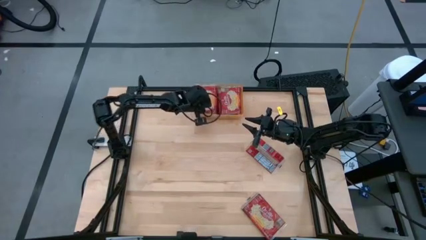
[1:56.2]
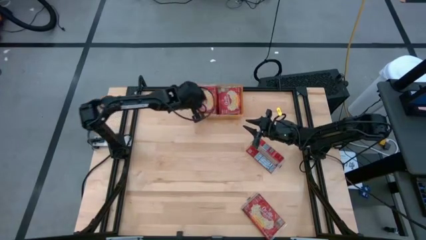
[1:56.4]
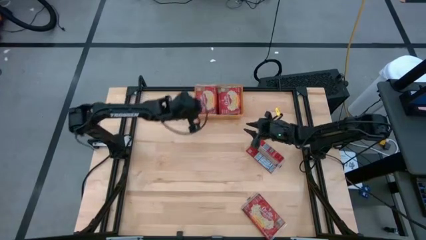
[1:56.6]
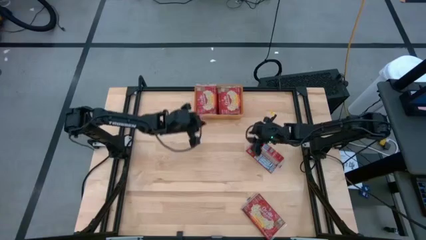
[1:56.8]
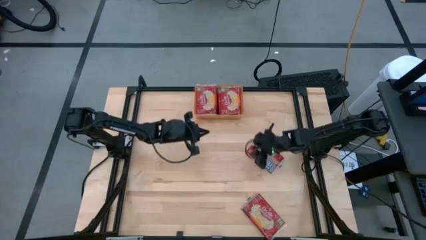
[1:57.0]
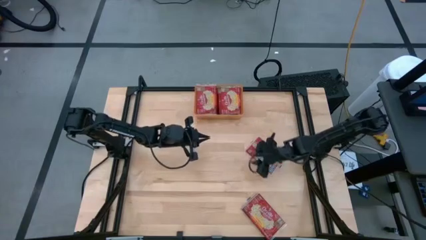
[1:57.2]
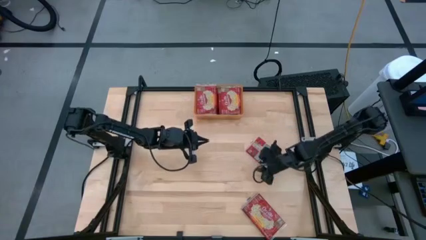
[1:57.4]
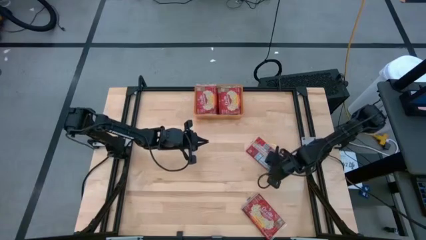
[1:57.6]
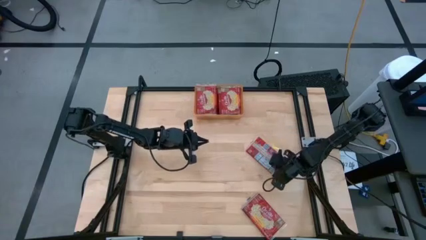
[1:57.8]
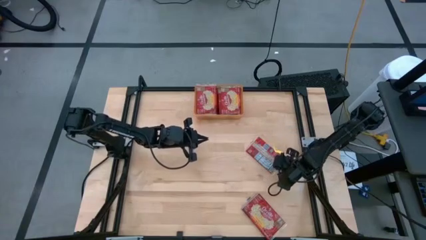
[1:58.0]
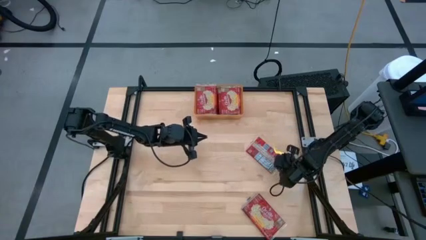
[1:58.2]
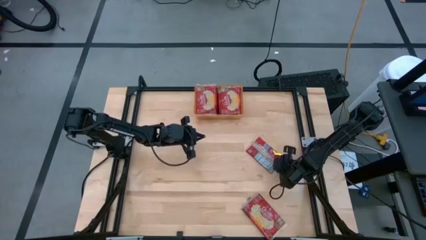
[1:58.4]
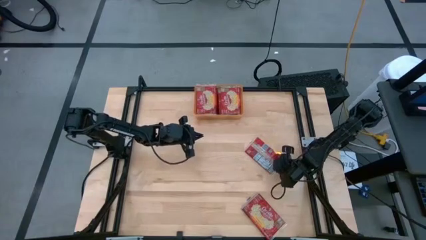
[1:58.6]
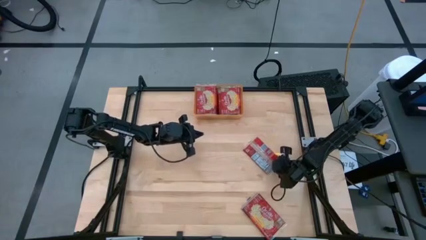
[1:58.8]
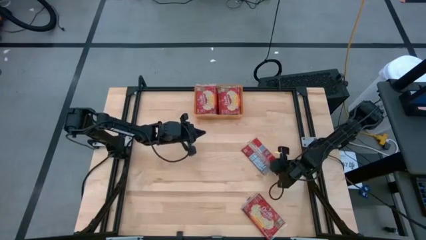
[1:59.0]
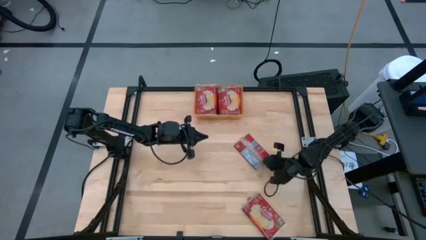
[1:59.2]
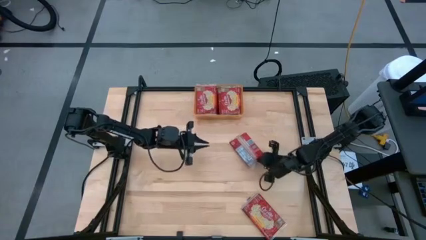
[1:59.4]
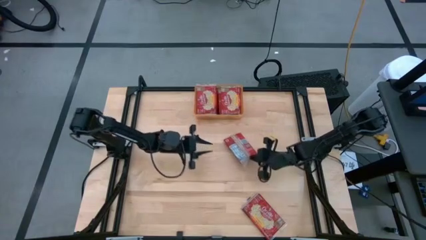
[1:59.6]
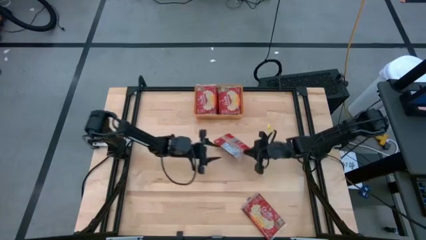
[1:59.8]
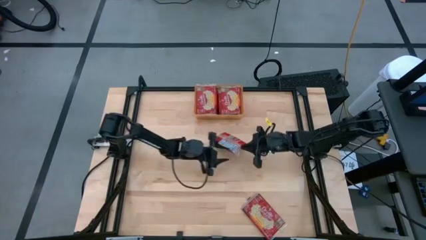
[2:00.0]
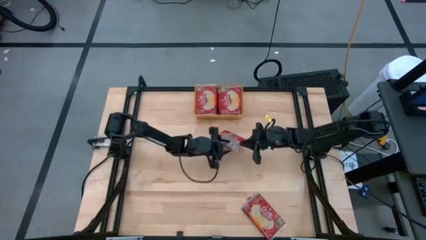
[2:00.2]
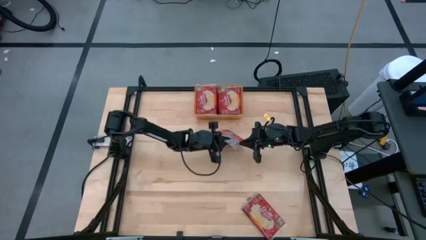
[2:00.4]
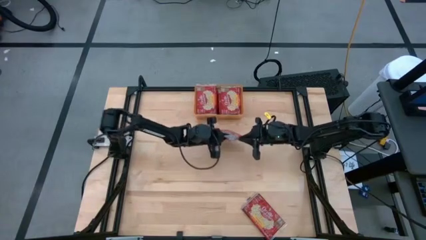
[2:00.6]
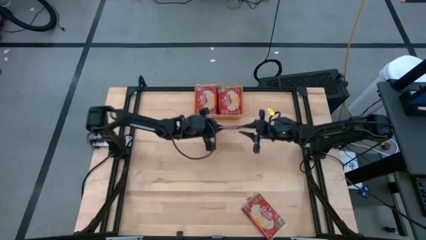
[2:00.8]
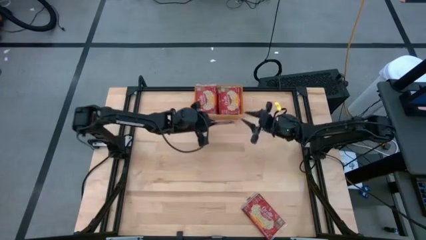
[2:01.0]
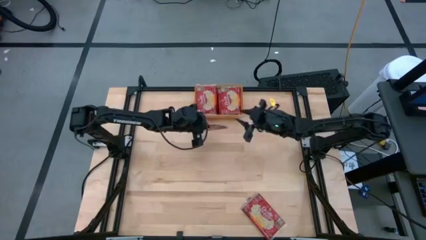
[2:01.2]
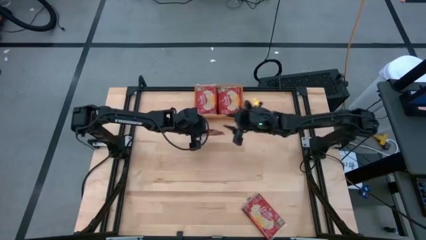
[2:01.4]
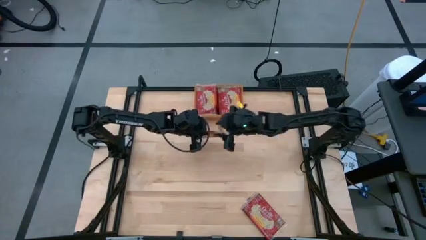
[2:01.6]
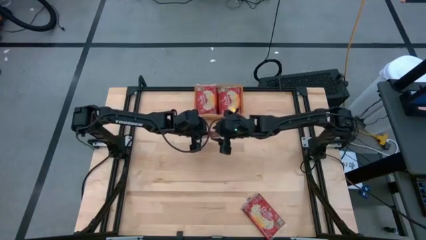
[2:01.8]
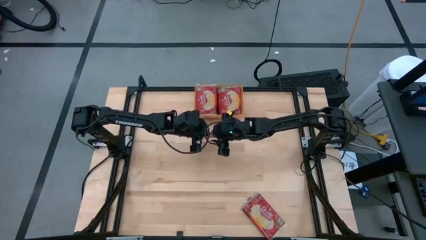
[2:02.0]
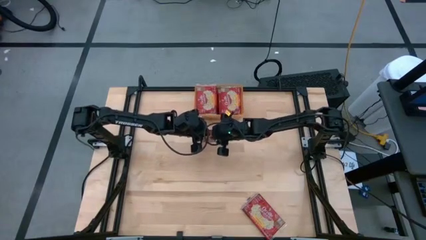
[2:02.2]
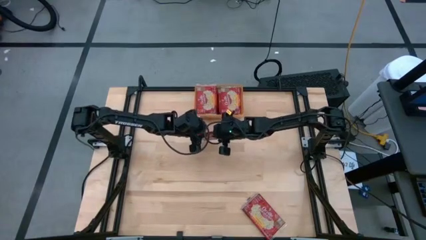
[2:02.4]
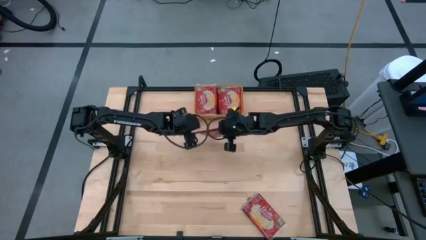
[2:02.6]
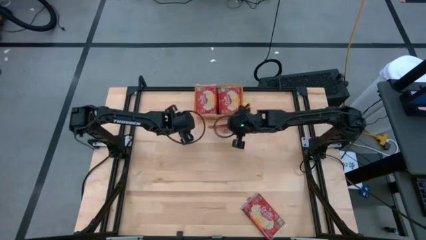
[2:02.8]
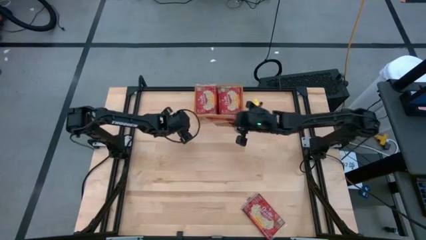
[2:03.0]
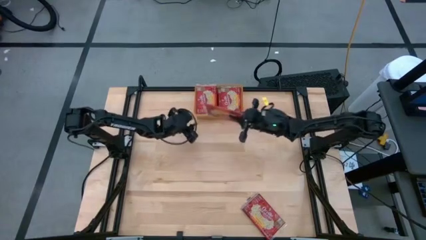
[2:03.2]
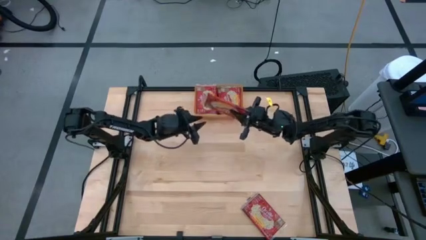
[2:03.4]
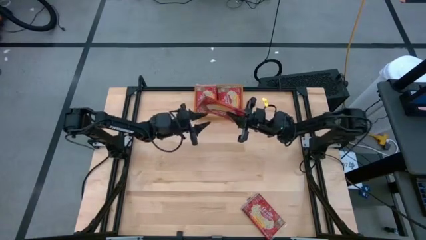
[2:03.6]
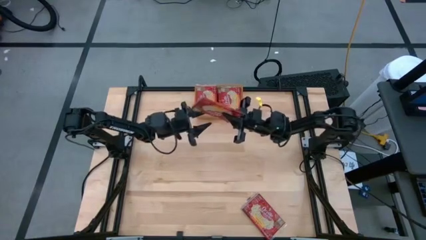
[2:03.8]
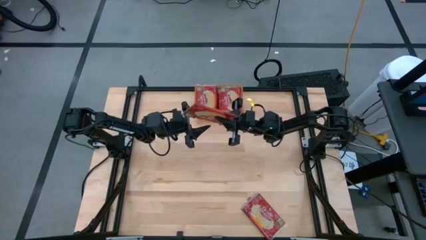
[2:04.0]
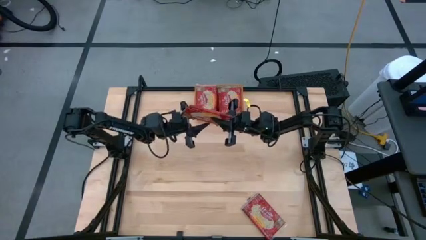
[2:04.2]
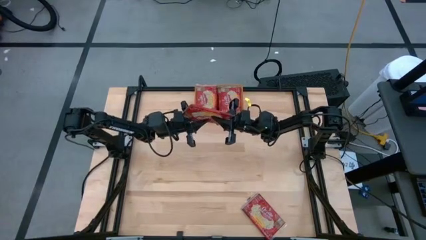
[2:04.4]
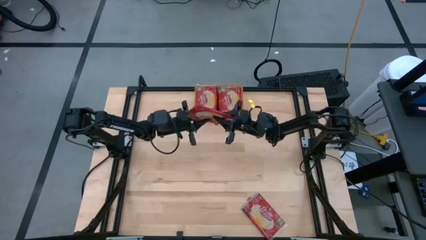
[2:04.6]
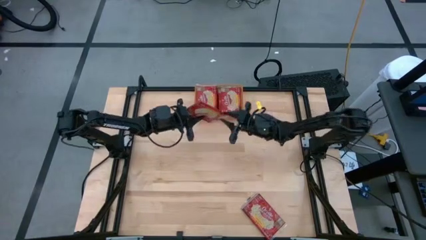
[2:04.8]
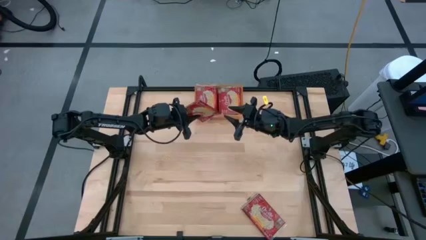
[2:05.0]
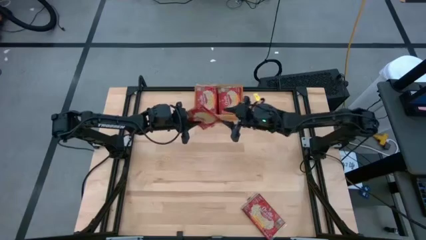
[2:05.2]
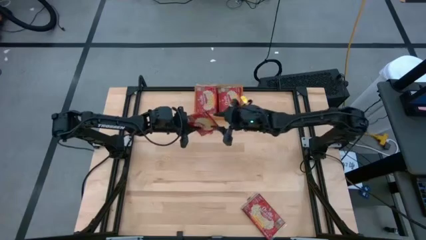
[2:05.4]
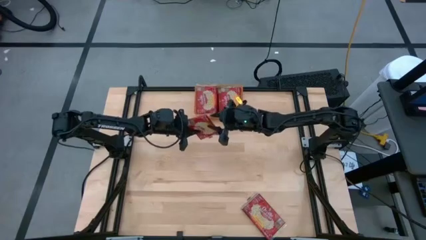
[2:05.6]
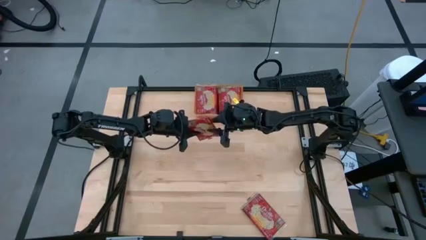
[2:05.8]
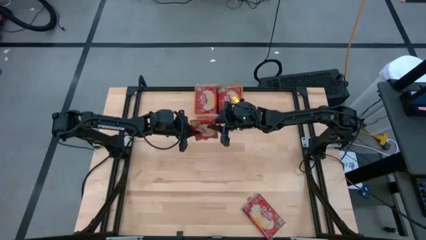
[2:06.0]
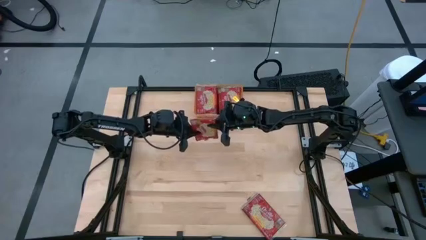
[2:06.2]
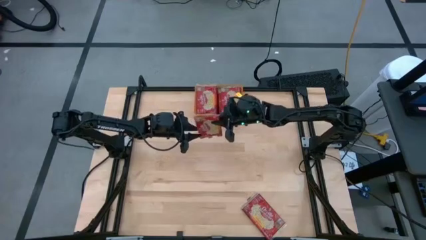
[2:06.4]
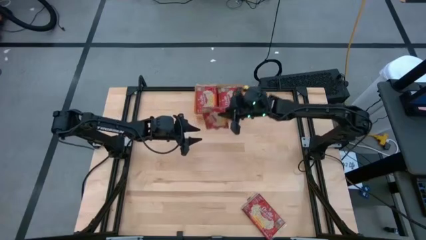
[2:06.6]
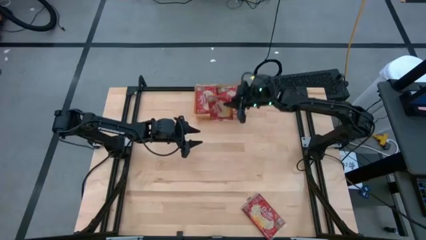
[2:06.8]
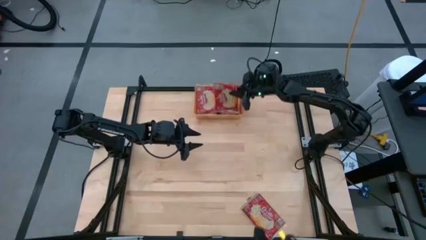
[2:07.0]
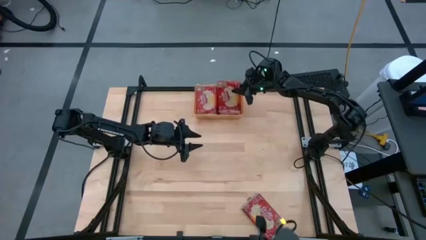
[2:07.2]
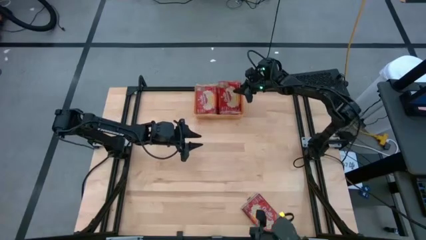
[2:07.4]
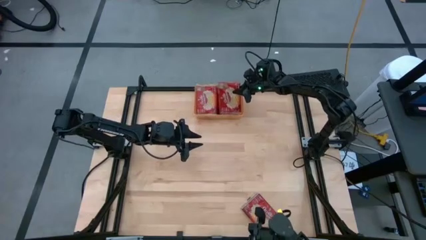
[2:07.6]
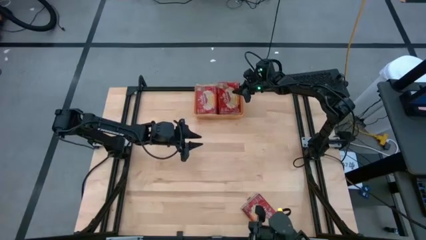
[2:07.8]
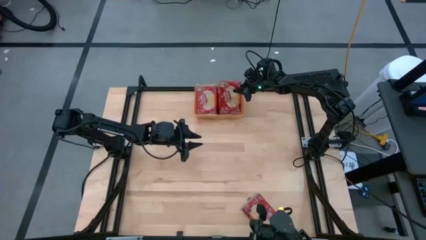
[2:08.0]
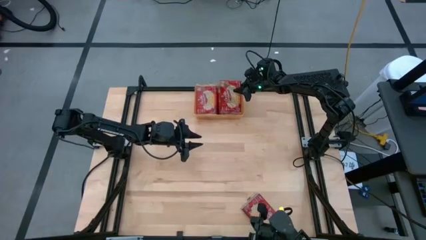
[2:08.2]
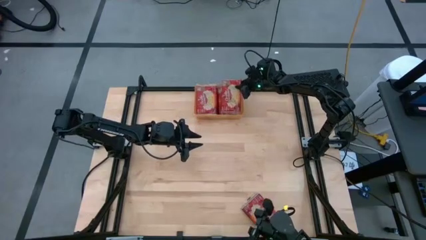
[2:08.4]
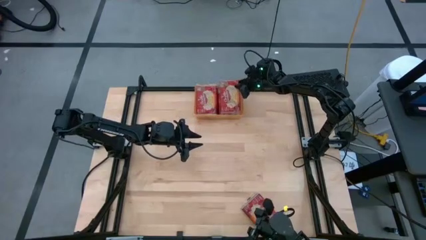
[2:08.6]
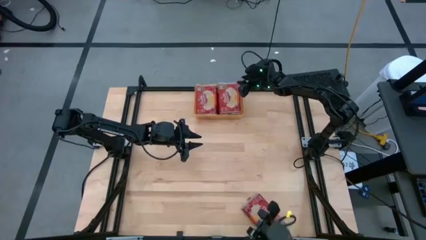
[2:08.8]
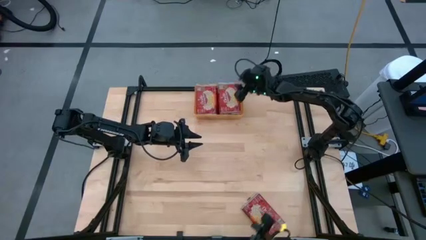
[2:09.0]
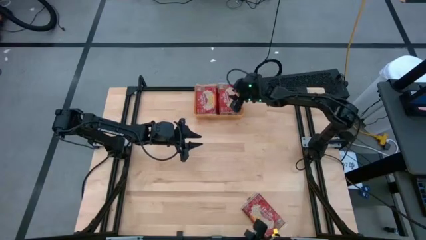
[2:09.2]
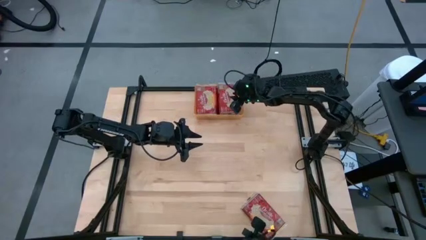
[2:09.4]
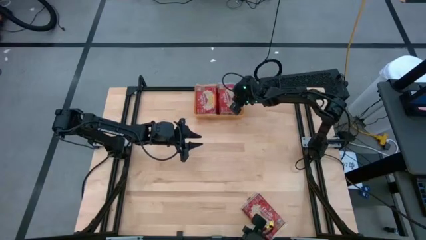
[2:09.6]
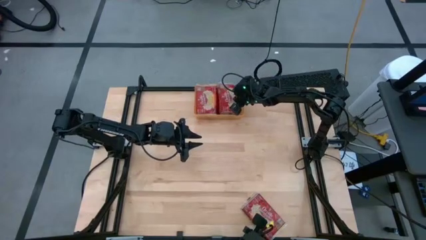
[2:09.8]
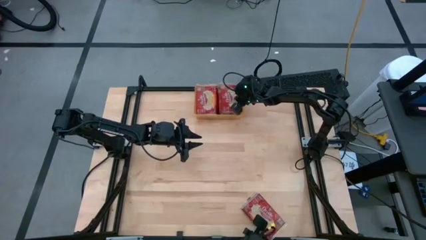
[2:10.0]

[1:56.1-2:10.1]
Task: Sort popcorn bags into baskets
Put the popcorn pack into the orange bin

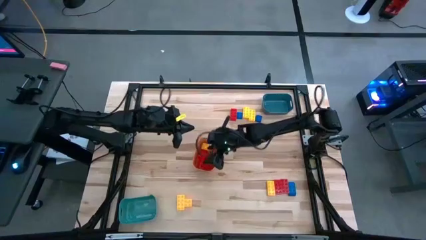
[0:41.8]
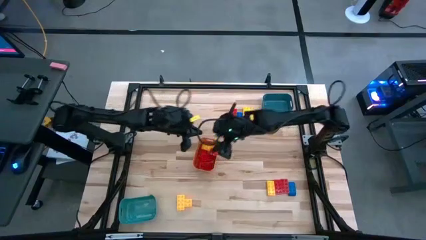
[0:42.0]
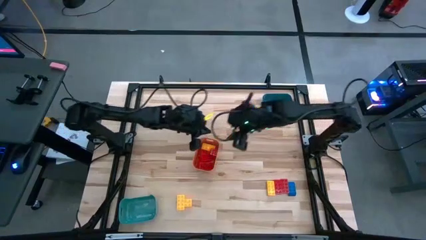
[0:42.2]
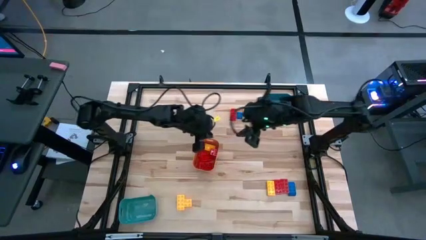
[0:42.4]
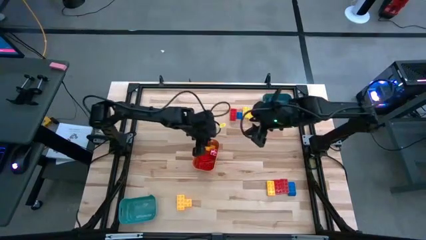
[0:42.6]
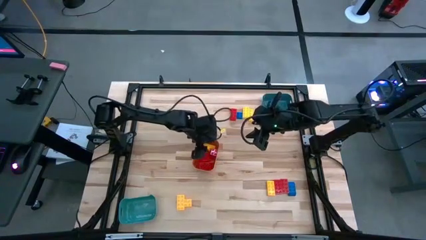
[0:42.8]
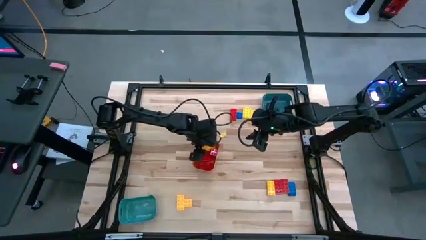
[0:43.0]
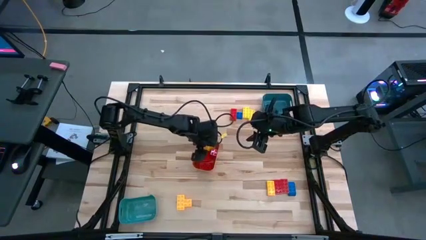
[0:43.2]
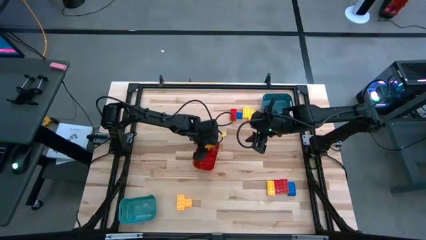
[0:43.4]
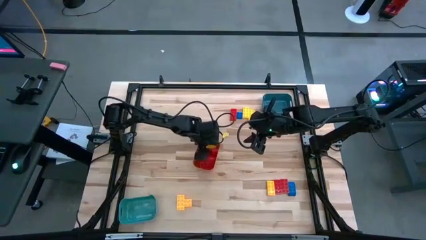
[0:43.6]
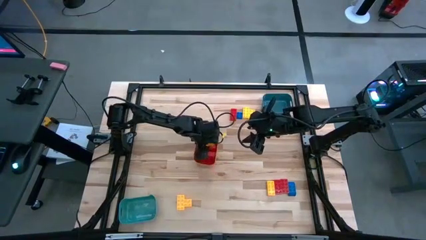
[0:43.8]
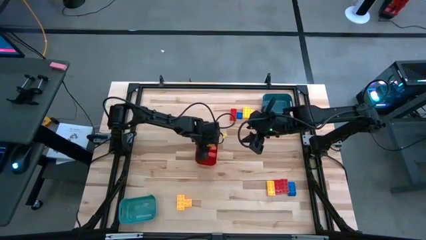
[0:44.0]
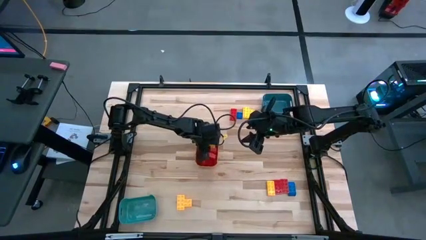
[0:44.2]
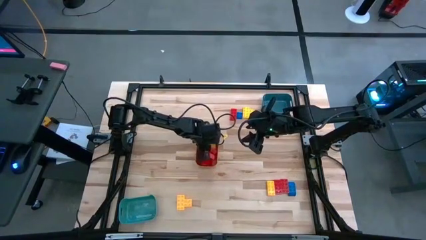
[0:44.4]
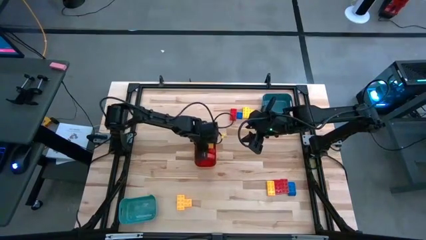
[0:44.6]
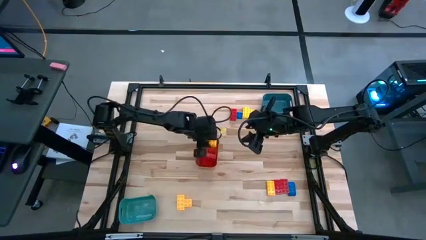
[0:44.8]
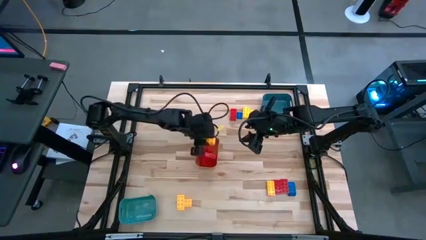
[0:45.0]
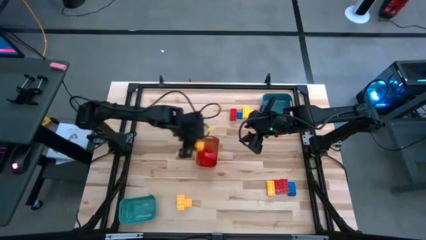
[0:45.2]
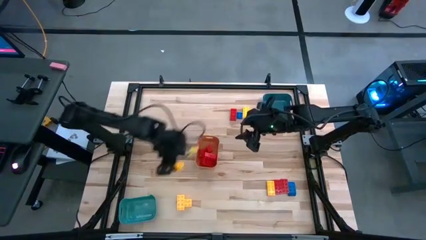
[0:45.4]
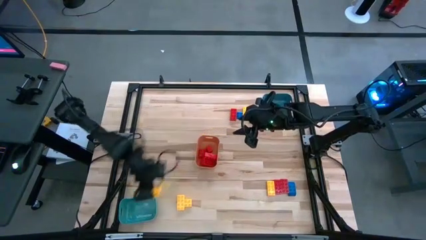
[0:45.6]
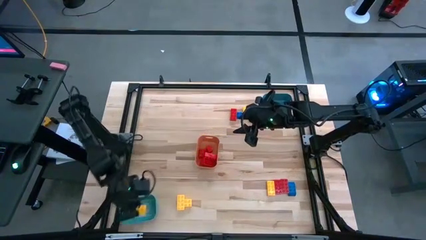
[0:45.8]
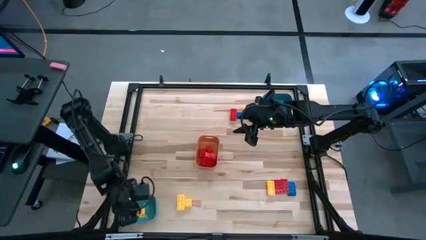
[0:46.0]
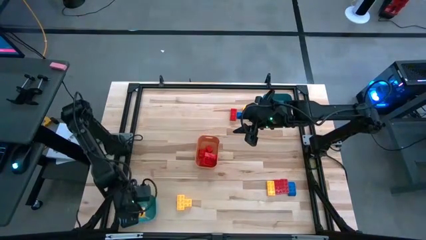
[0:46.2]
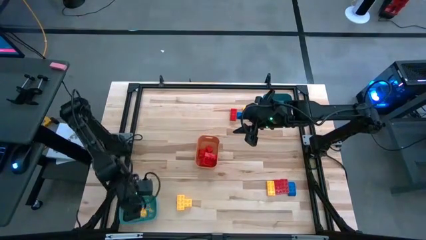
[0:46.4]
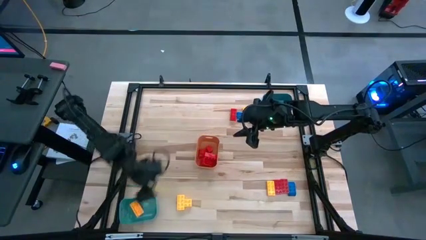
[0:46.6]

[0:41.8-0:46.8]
Task: Sort blocks
Put the yellow game piece into the green bin
